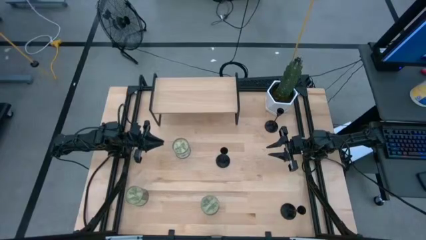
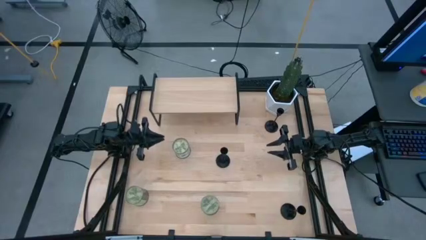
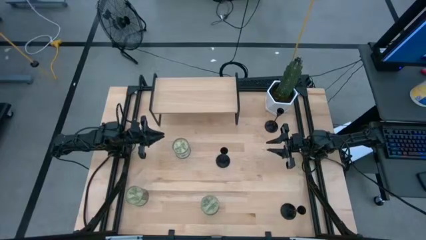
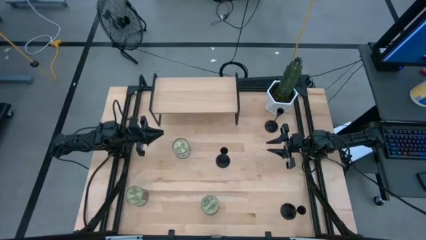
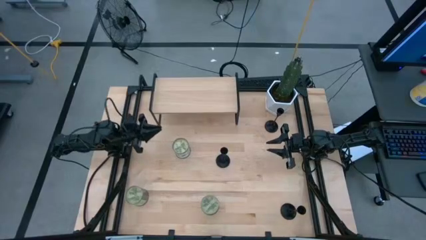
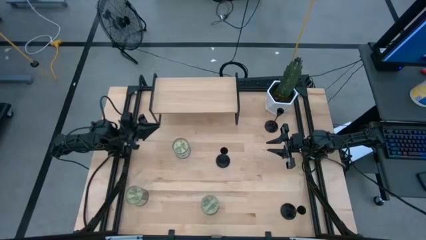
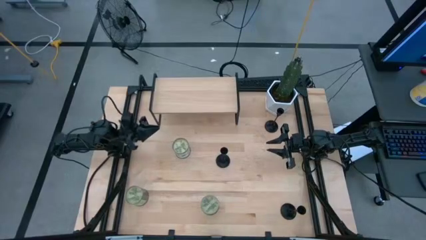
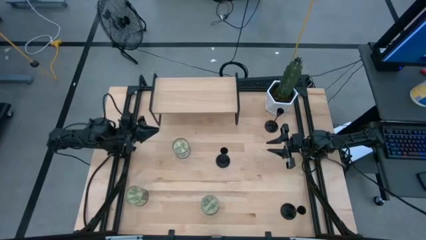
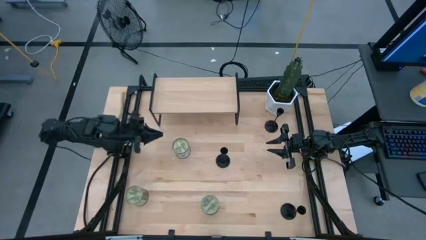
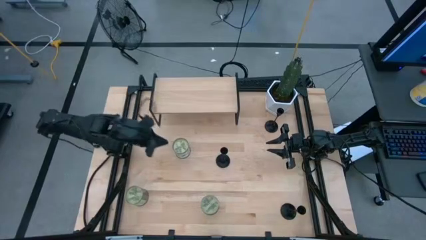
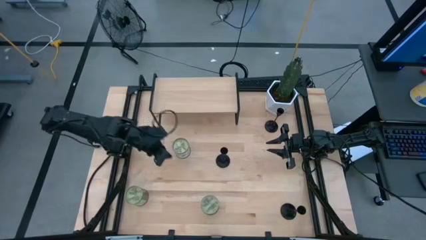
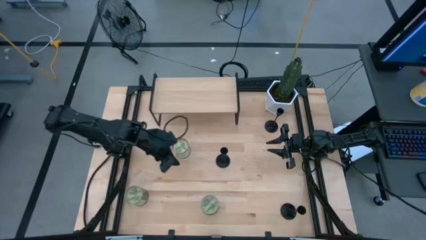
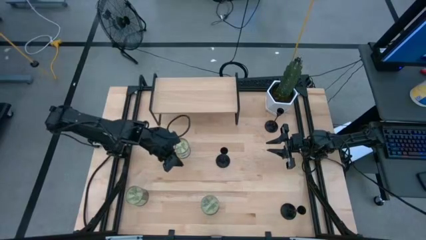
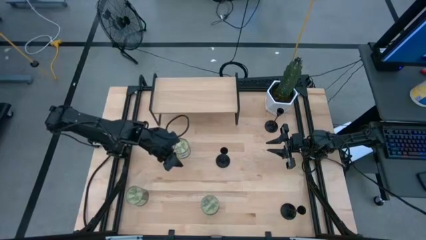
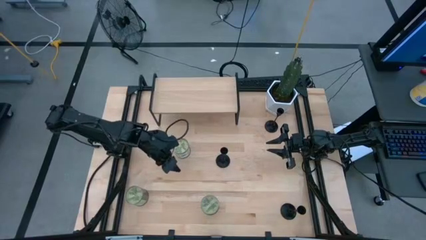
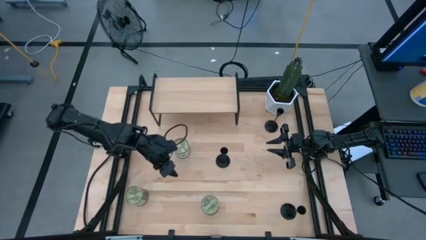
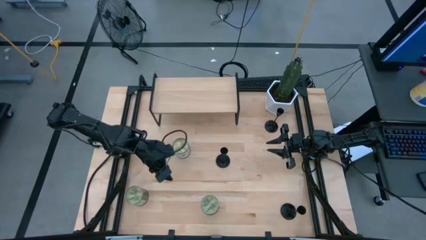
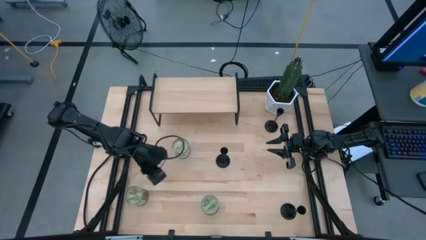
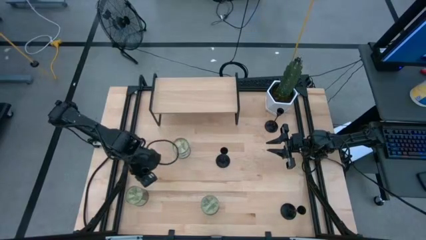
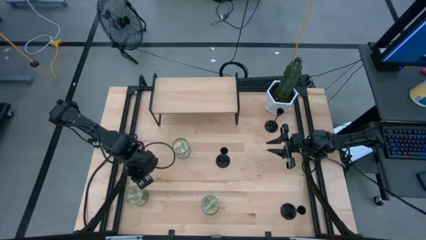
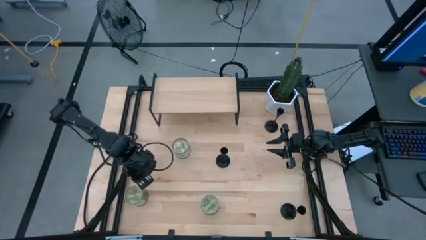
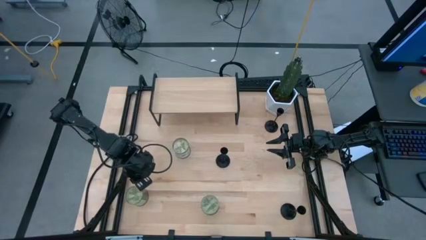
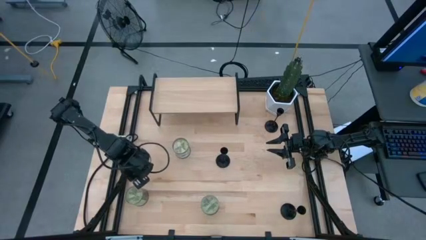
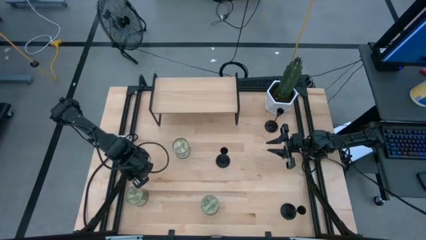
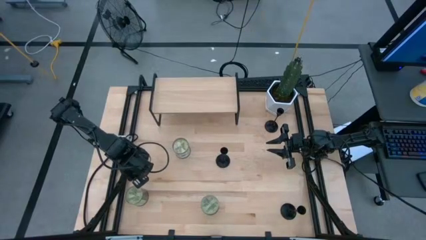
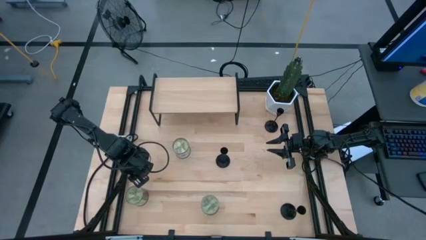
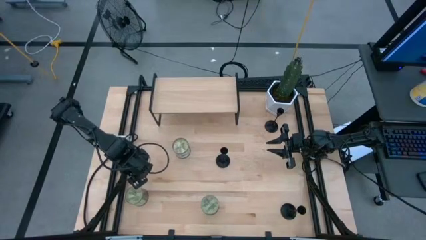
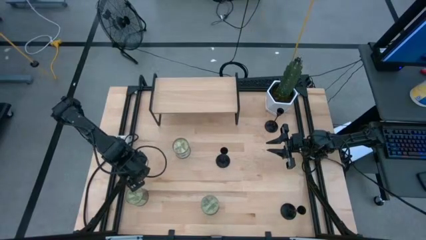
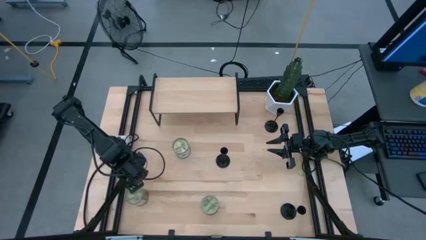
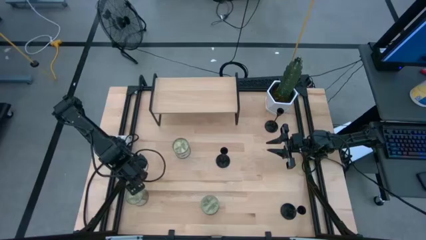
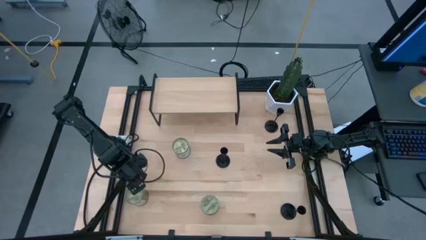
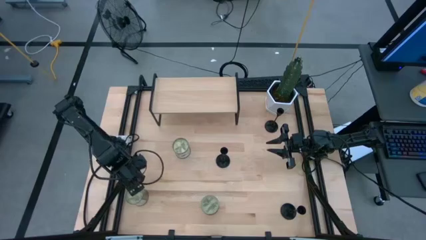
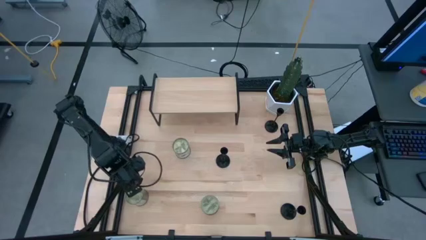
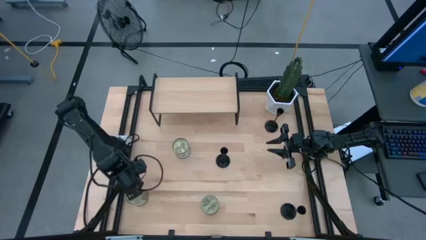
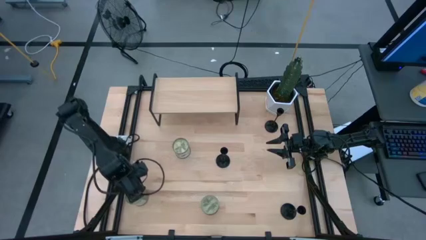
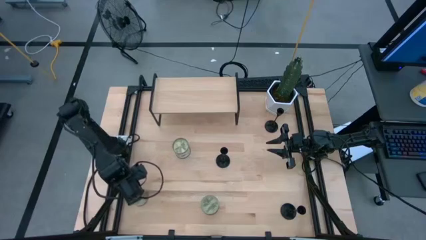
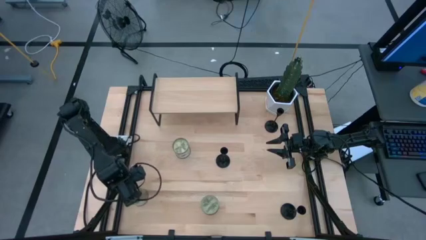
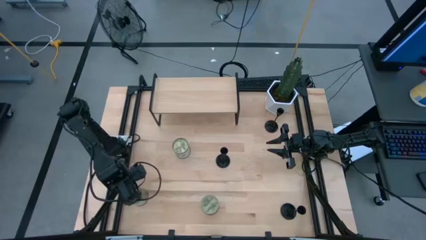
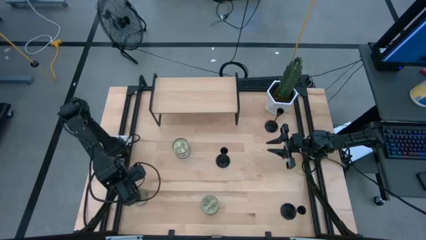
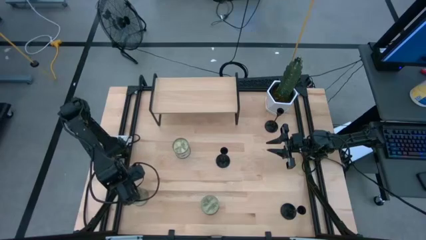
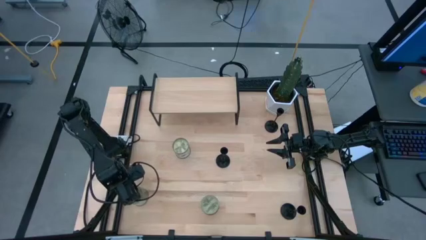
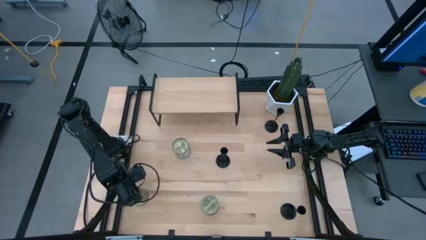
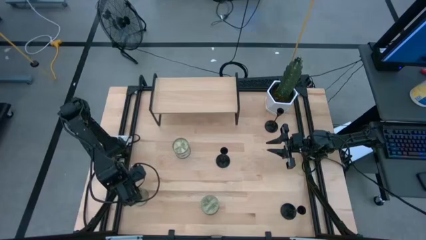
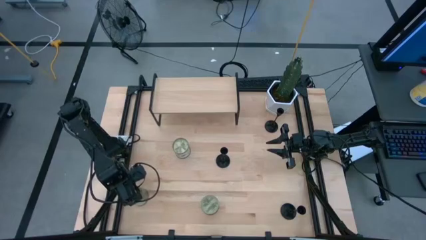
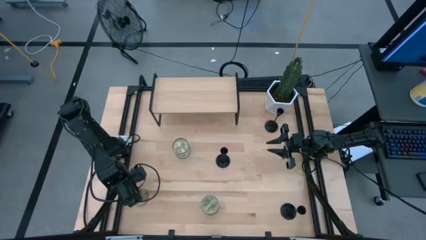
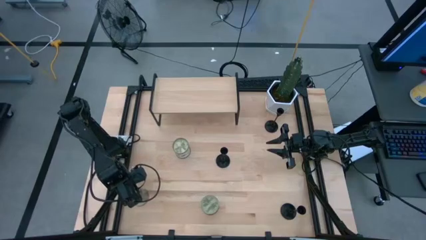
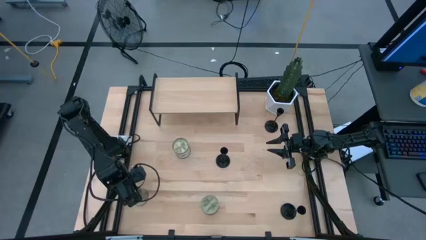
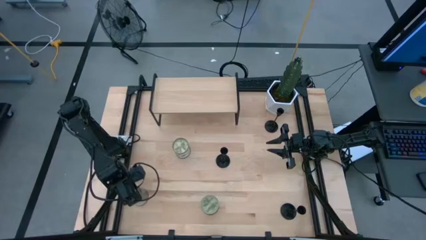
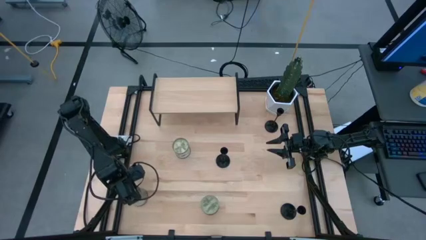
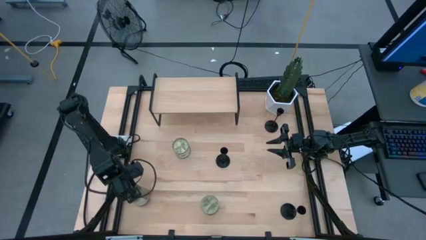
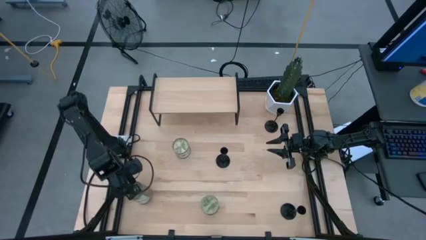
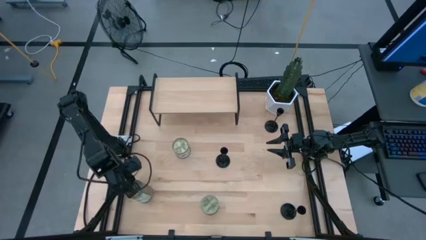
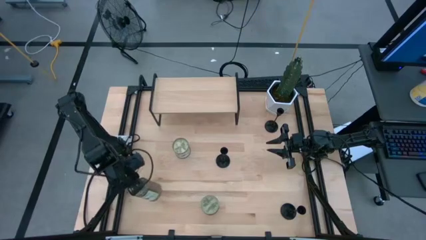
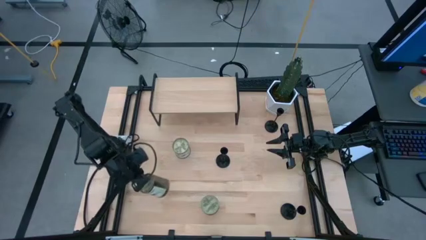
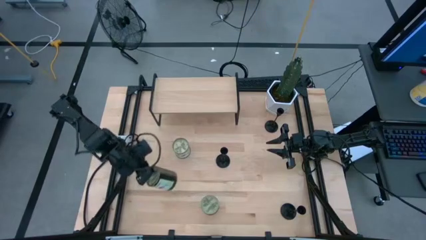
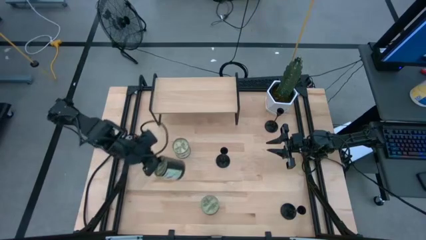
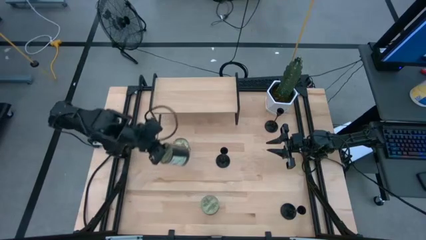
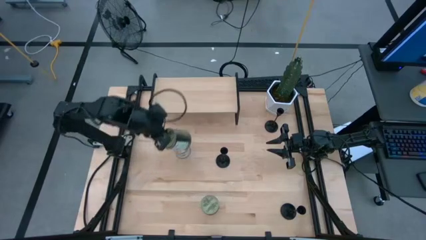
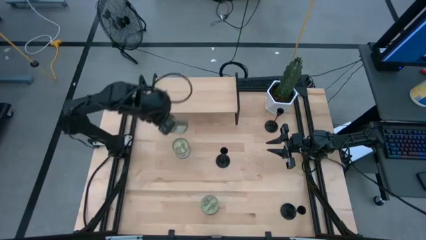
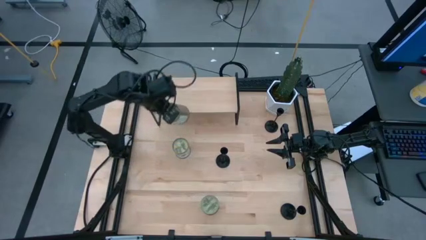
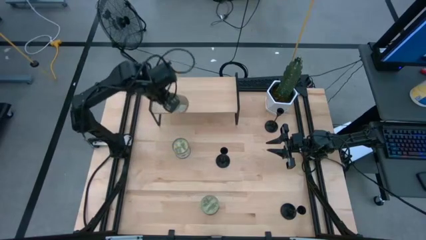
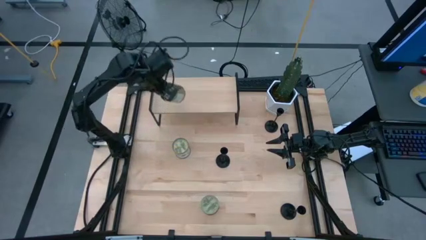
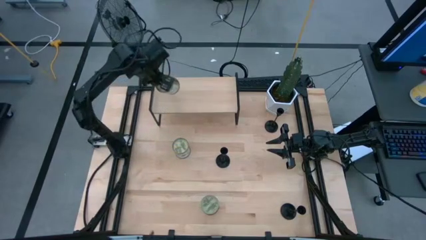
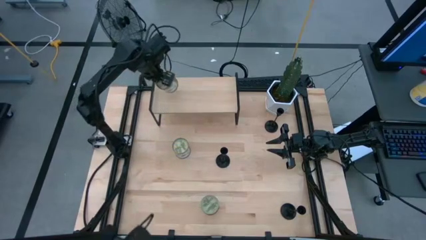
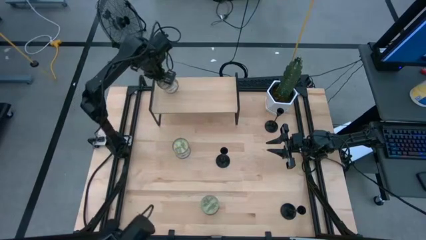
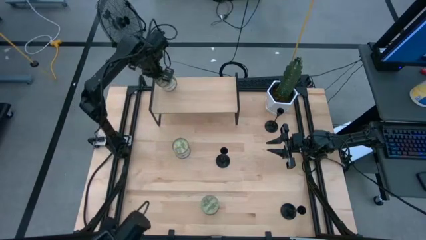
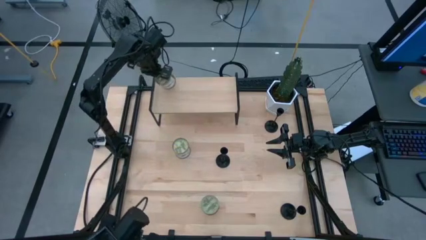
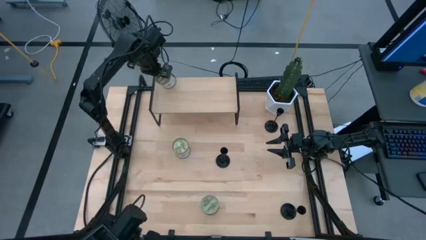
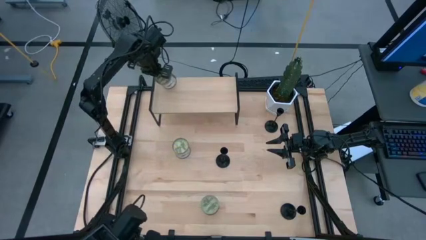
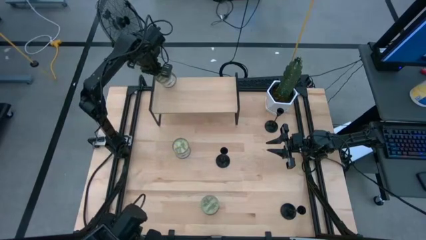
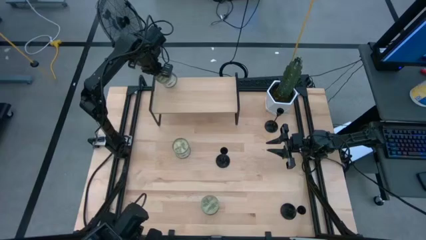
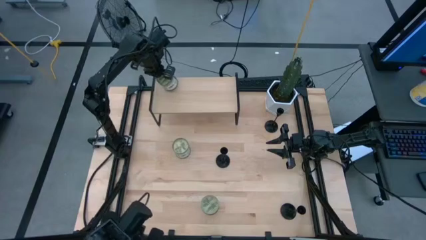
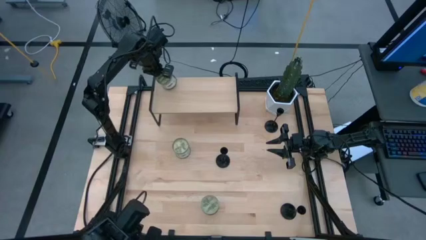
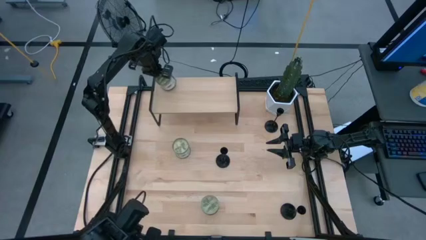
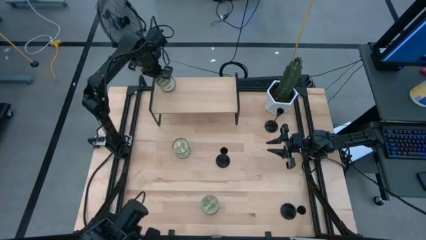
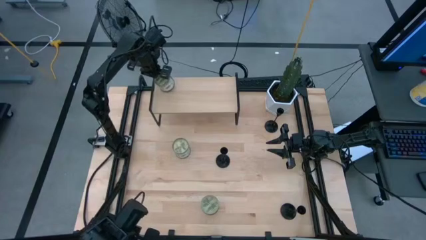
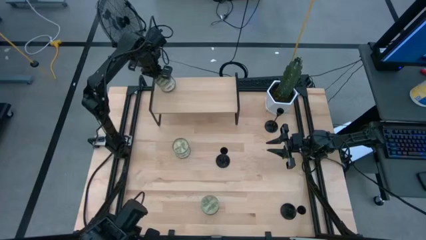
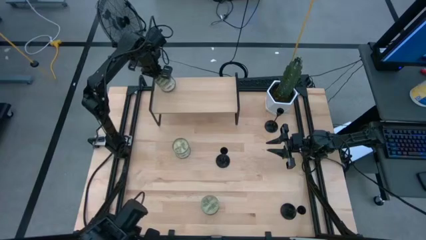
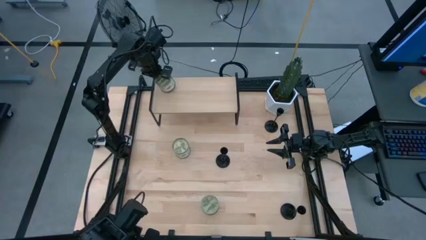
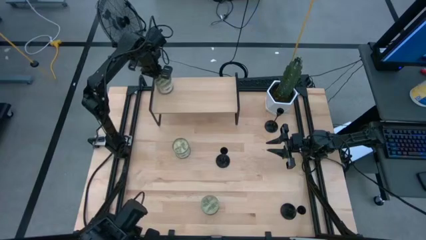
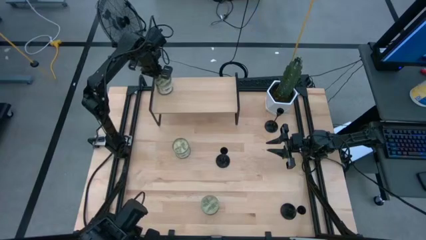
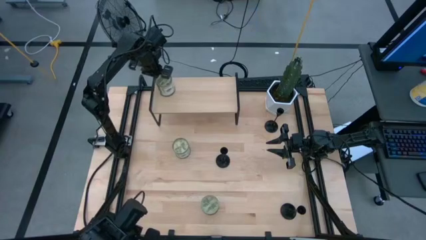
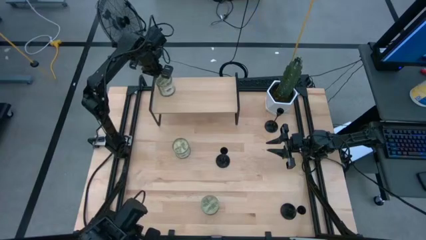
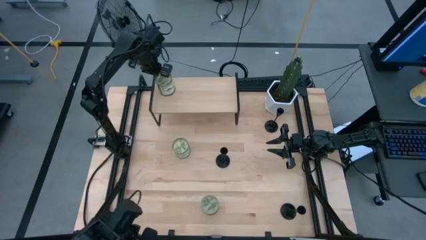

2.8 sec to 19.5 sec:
Task: Pick & Place candle stick holders
Put the bottom left green scented candle on the shelf
